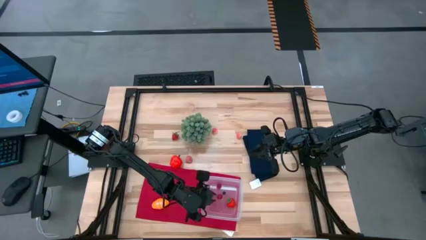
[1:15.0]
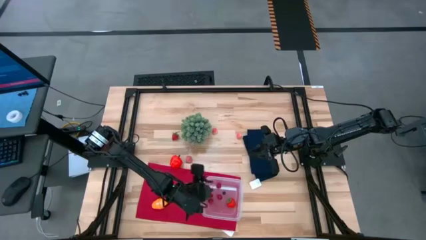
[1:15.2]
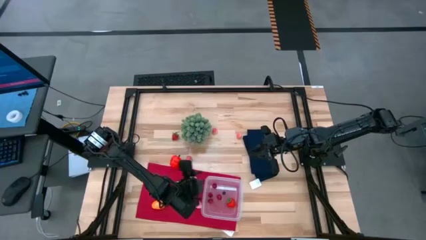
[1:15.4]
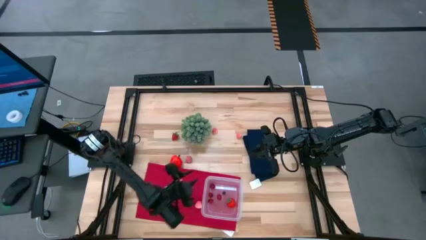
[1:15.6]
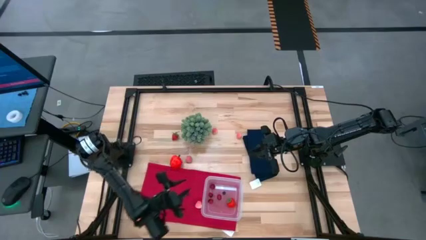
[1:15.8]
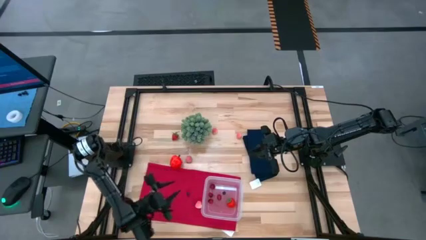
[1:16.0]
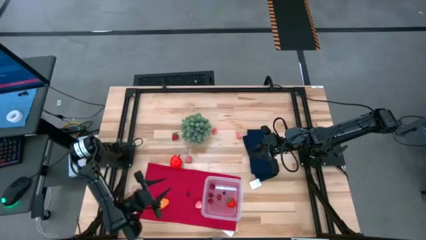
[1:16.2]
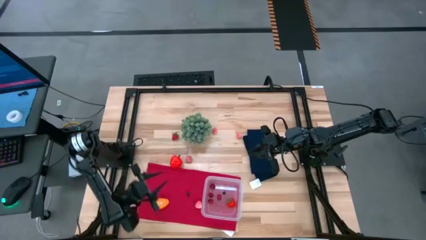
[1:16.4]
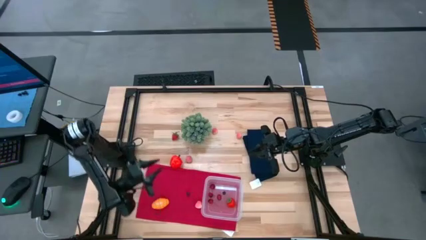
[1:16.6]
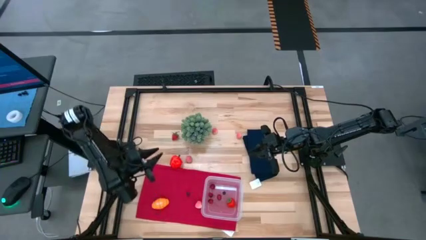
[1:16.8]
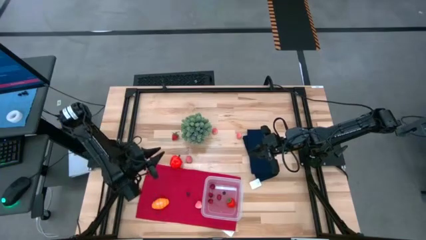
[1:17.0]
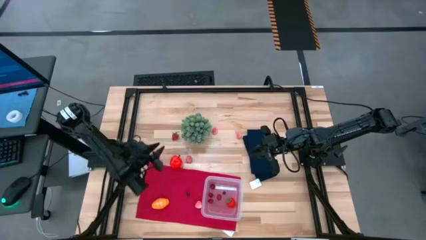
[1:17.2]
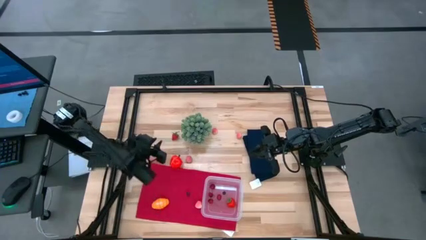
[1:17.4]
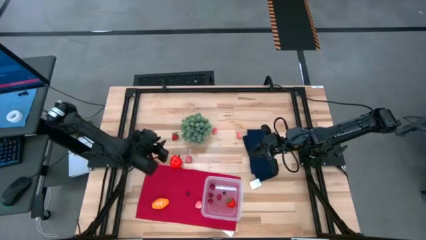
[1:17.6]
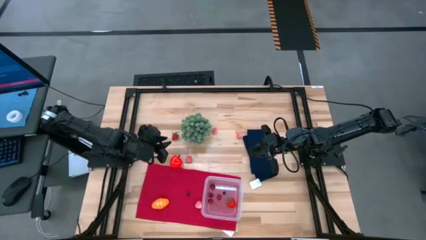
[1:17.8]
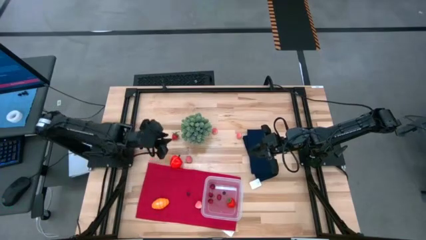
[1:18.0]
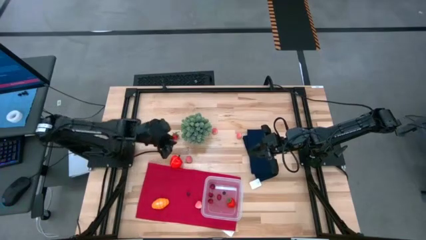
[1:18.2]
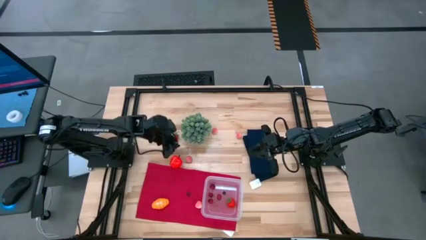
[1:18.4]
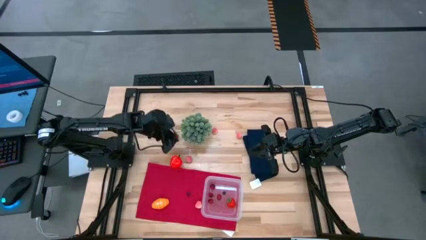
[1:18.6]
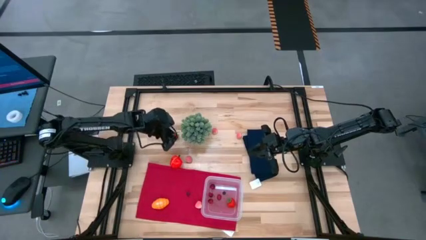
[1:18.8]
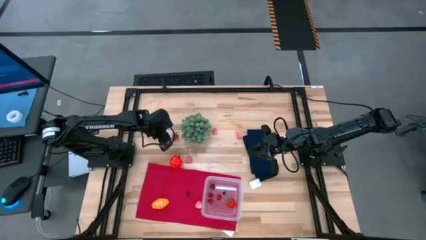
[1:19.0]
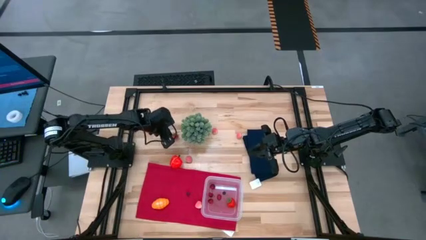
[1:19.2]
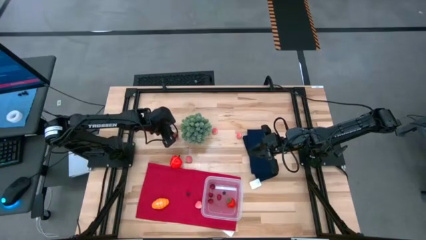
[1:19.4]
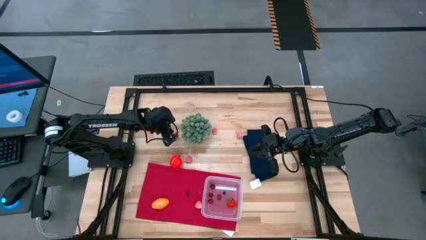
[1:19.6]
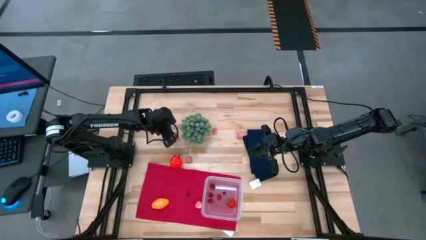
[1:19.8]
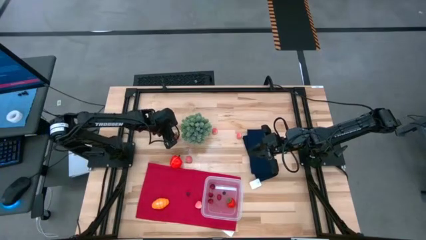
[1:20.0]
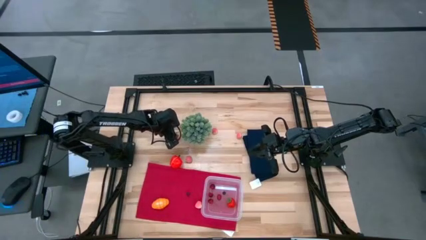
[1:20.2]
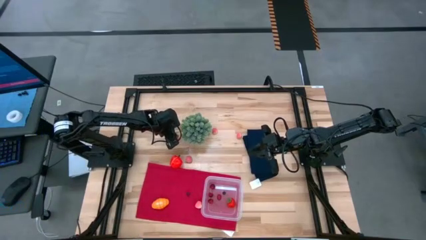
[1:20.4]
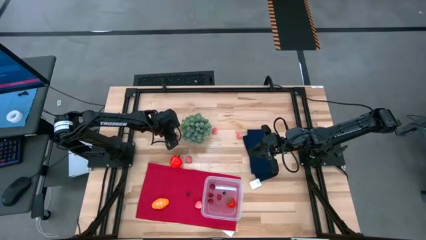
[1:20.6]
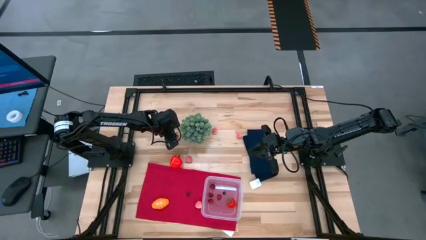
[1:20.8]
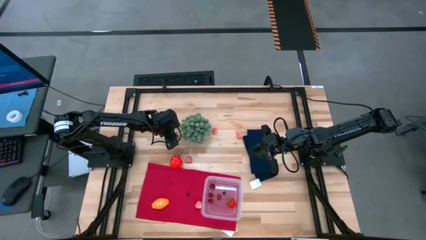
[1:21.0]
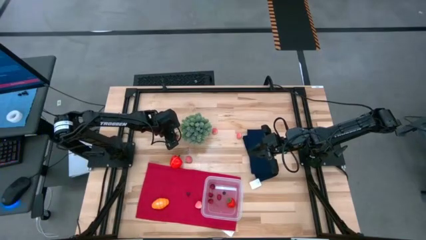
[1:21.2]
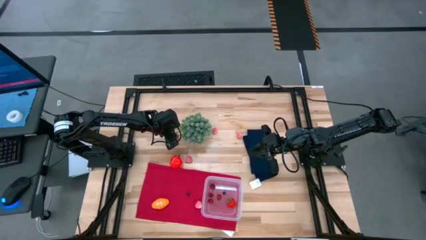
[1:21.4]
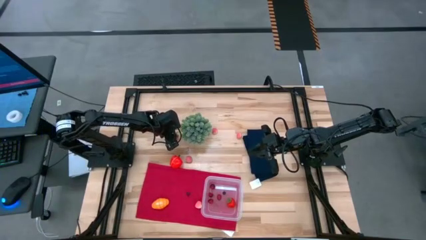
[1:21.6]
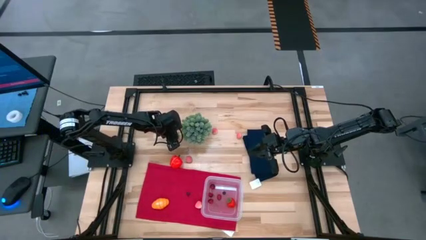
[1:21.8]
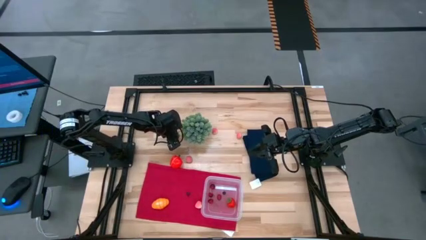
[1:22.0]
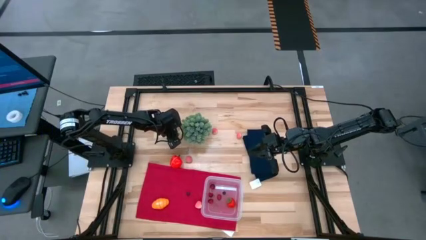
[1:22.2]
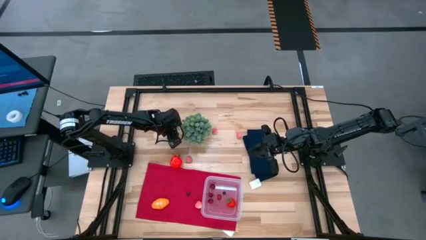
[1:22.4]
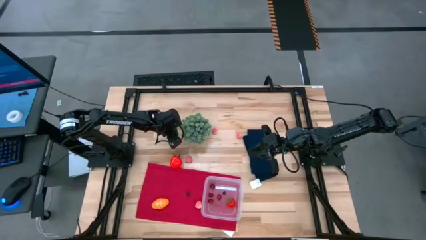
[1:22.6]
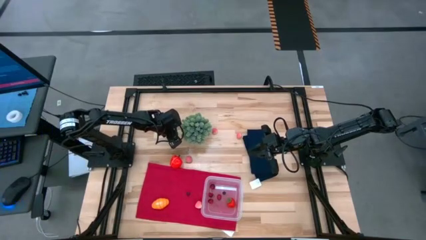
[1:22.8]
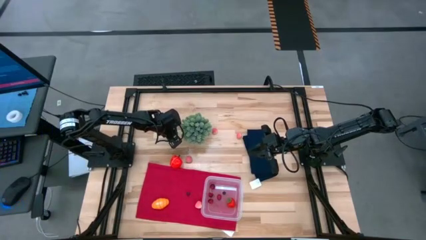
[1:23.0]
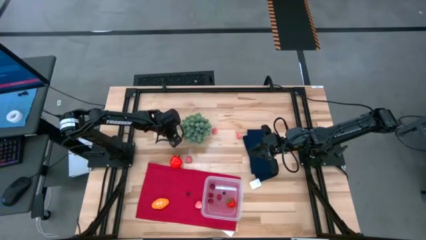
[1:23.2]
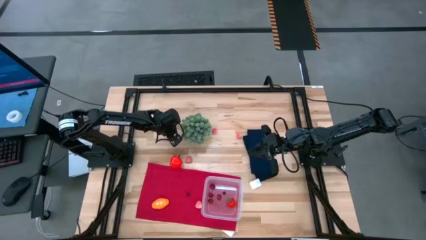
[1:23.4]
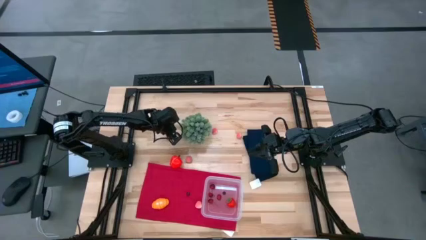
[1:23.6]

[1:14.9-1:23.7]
Task: Pick and placing Produce into tupperware
Put the strawberry into the transparent bin

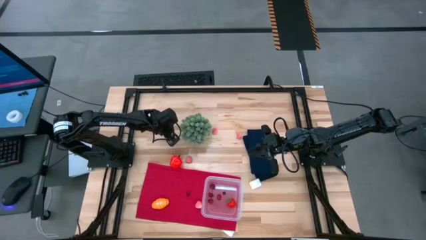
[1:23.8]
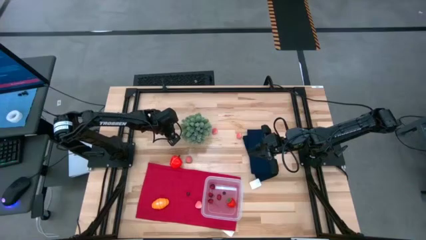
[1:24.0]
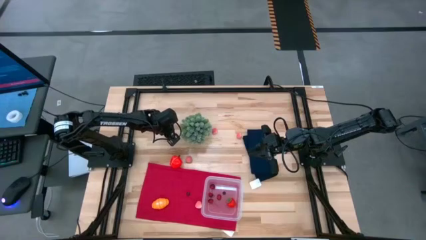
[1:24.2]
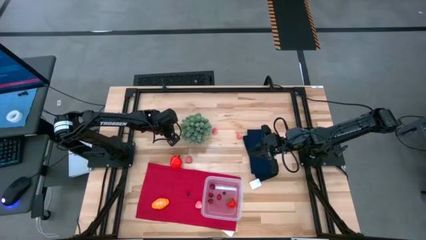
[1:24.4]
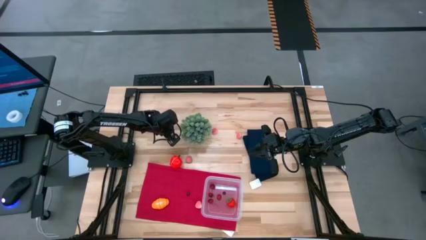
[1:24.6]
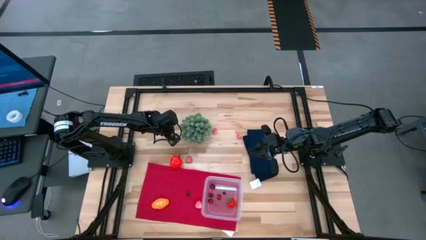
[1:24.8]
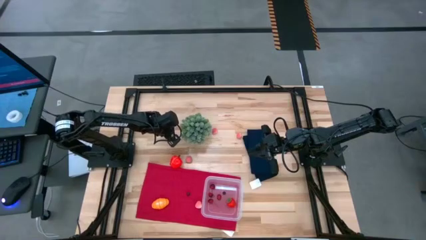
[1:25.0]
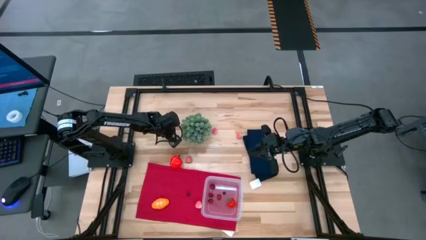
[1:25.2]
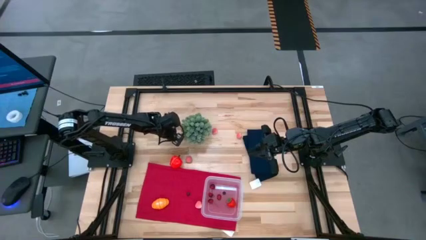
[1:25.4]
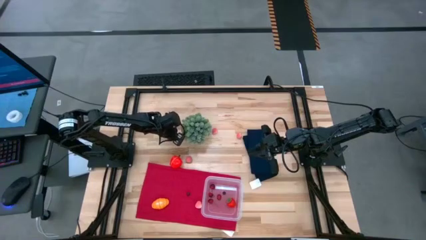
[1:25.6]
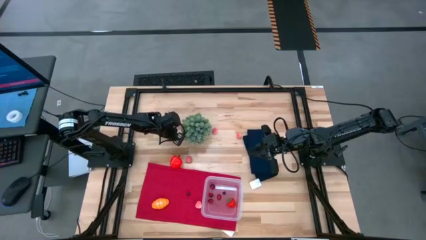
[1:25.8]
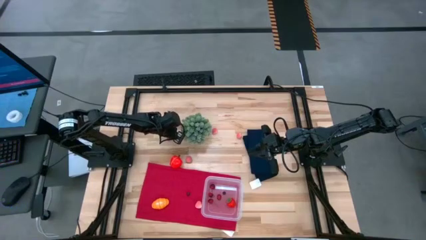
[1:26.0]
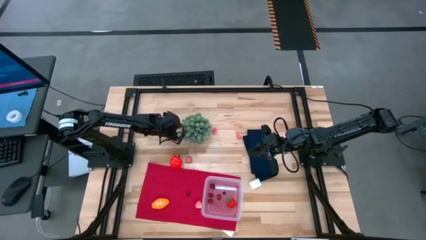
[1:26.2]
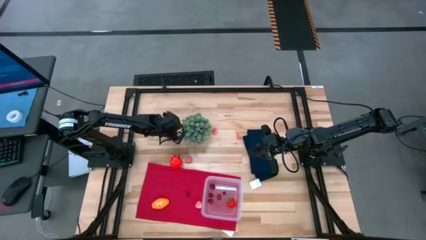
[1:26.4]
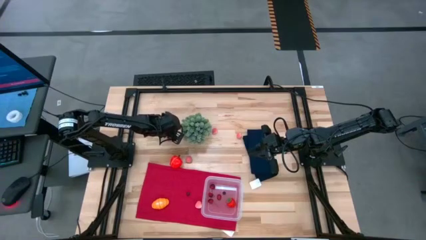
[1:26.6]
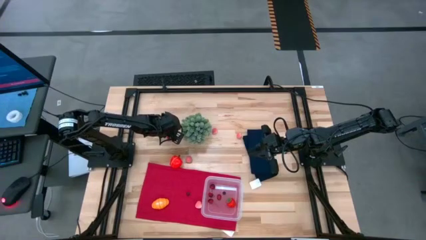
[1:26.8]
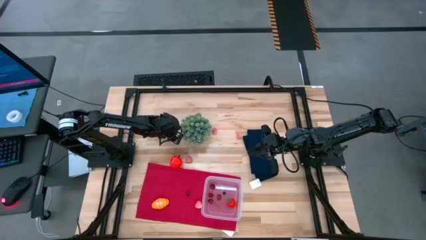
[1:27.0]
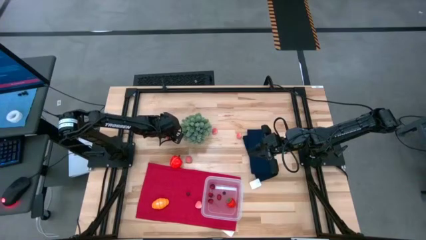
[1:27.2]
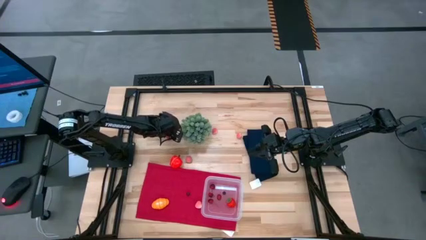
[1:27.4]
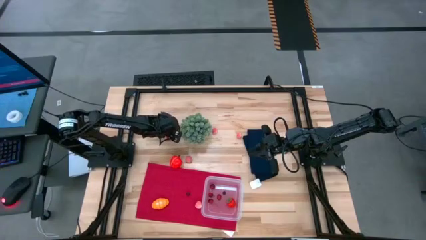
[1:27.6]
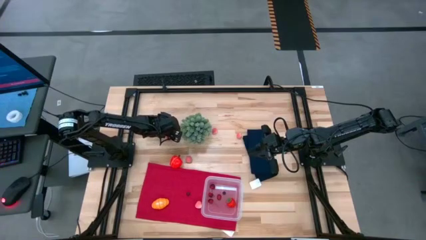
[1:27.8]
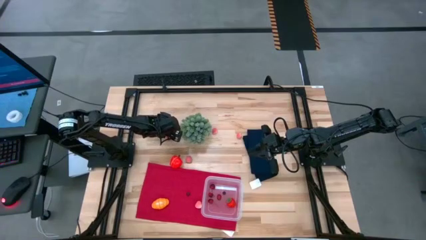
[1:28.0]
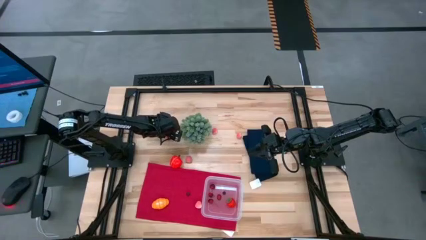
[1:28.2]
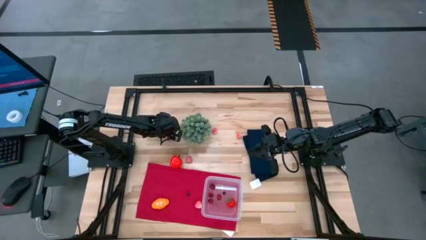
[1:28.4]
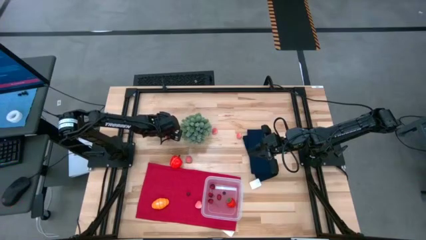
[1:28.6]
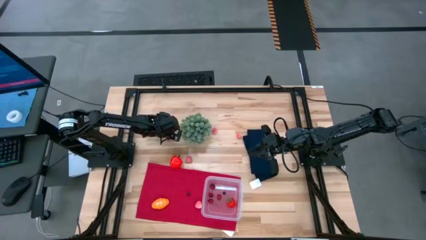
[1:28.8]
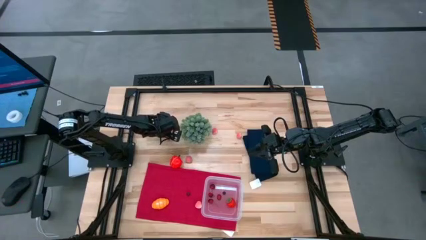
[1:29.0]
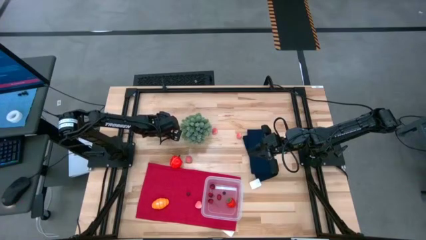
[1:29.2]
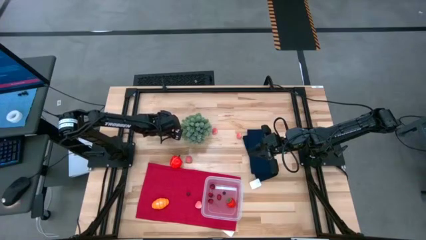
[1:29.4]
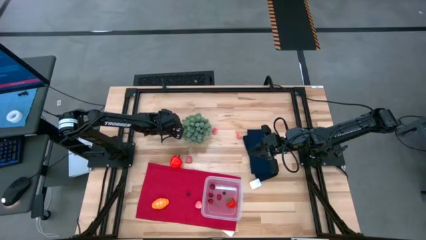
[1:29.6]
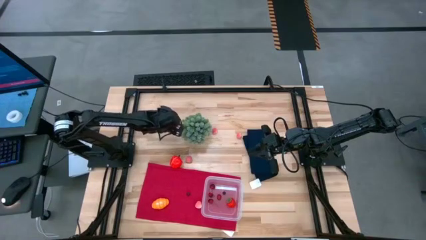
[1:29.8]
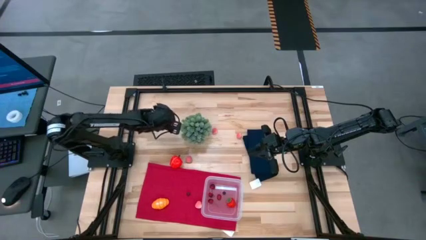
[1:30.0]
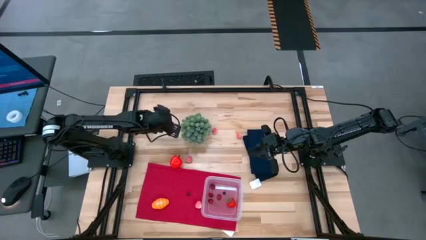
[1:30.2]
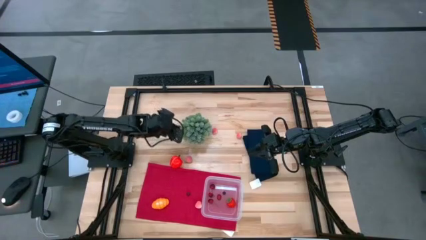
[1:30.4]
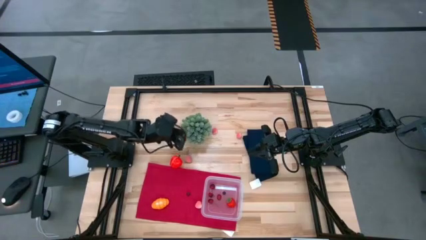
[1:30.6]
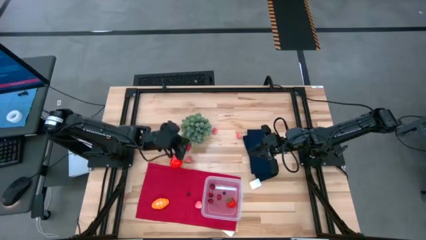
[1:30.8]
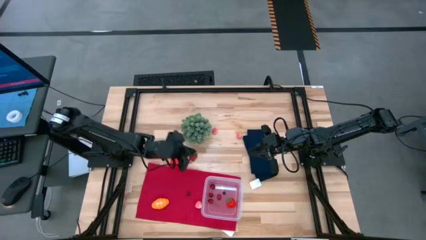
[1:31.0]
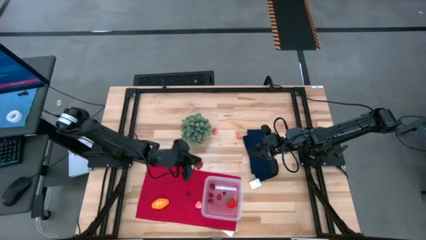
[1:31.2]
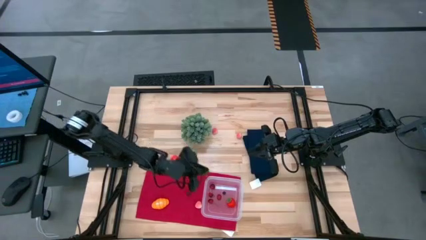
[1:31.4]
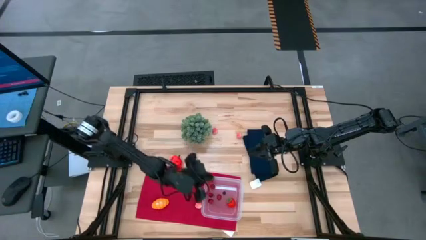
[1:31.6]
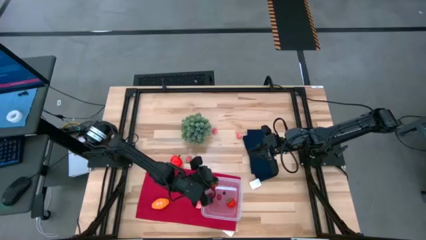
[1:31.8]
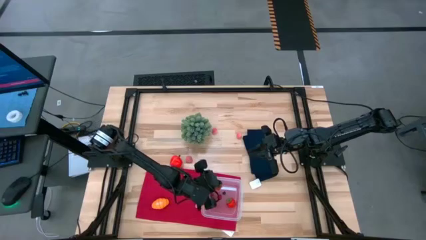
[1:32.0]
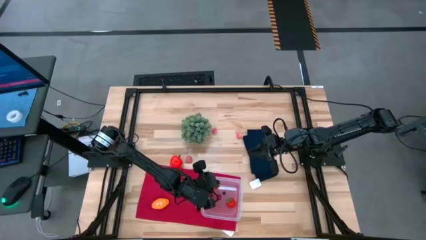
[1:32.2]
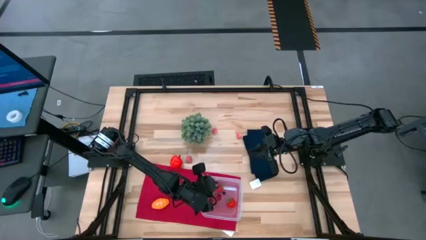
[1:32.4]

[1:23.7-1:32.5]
Put the strawberry into the transparent bin
